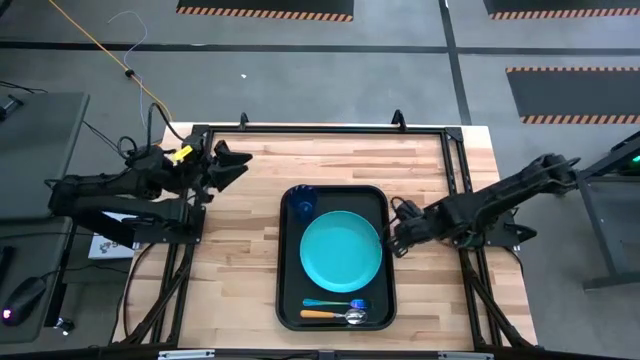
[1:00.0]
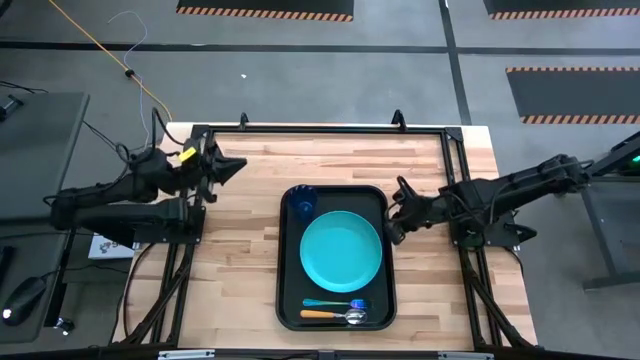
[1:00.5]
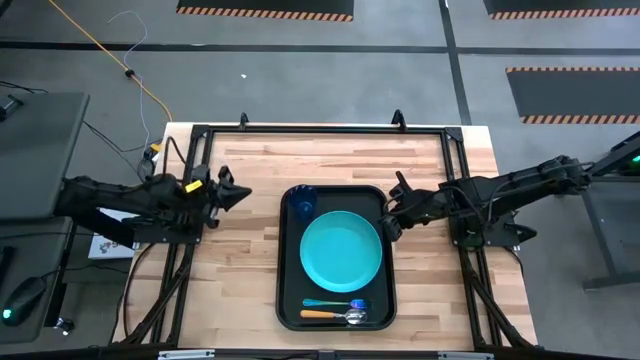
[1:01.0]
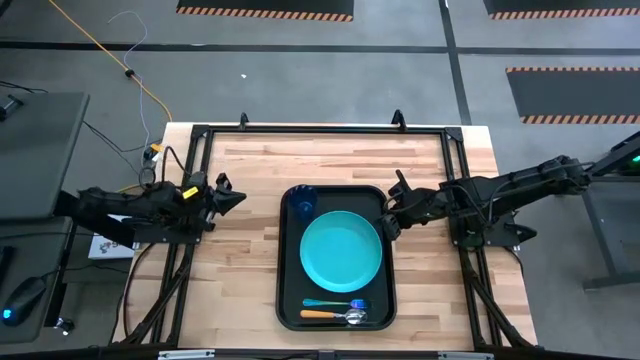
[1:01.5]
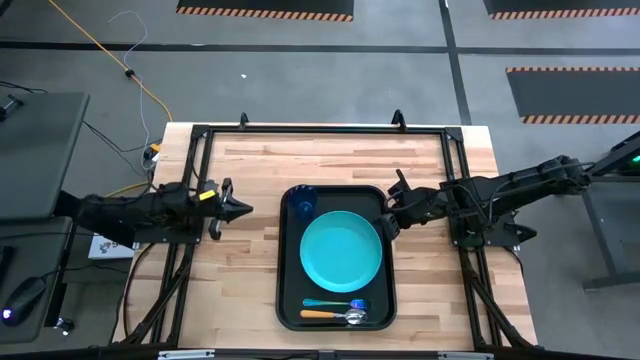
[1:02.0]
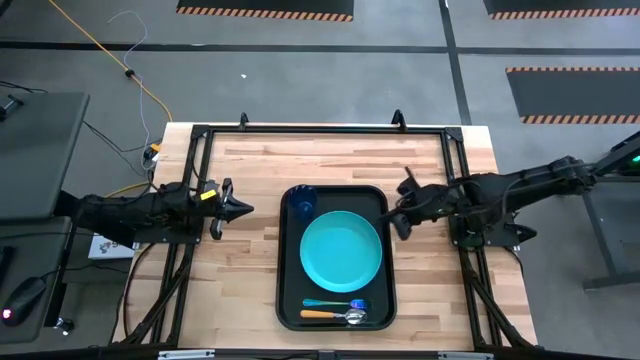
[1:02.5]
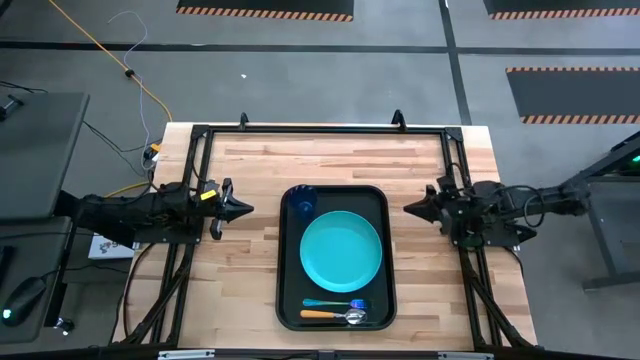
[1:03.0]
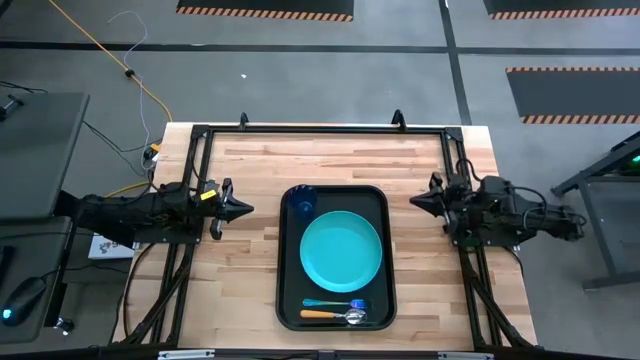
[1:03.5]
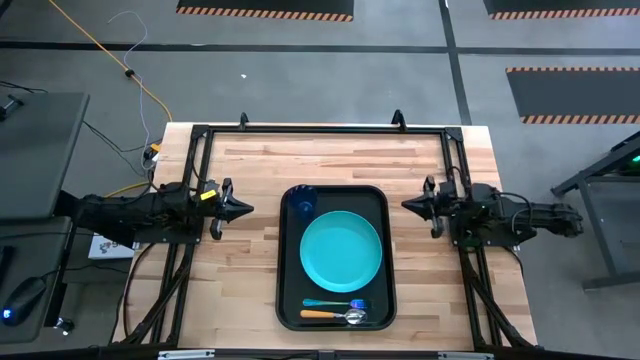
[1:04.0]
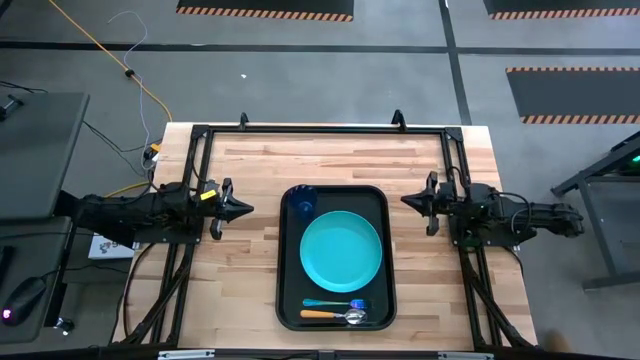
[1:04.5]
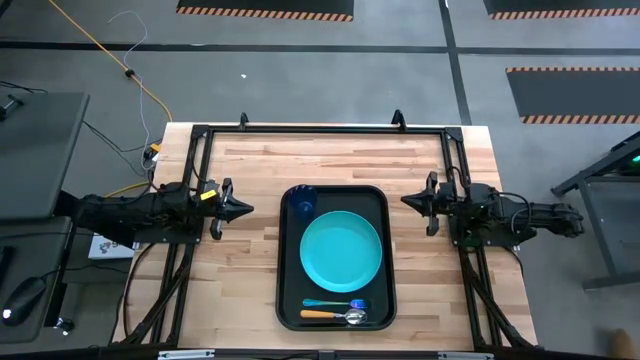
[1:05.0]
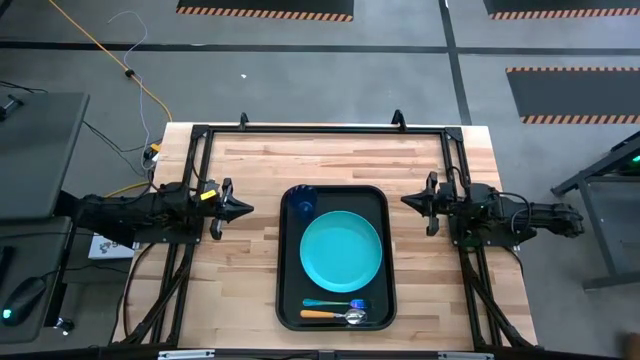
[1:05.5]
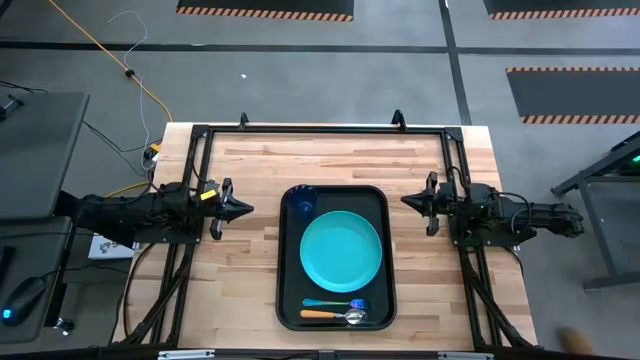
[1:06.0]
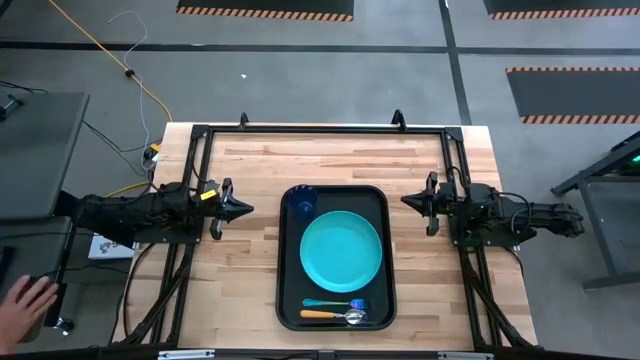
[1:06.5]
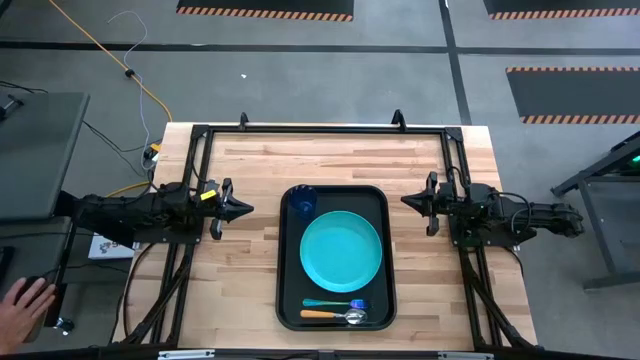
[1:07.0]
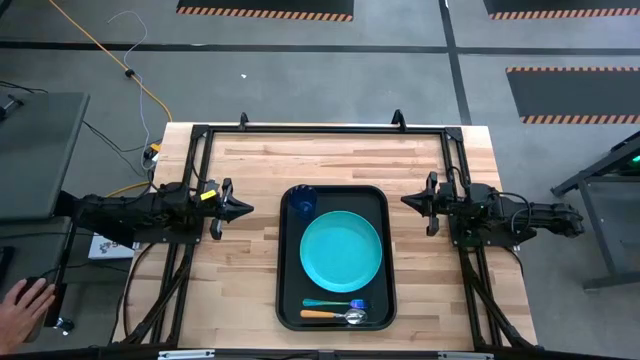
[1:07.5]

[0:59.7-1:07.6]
Task: Pick and place plate/cup/fork/spoon on tray
Return to Home Position

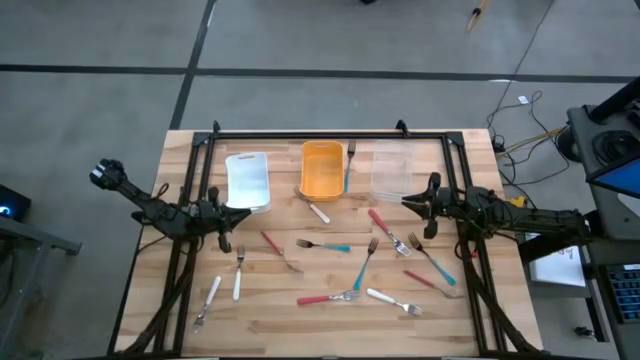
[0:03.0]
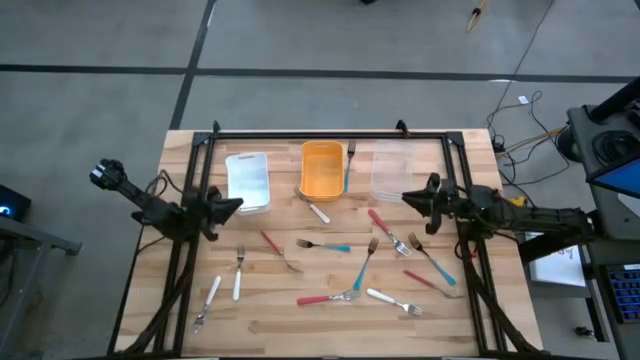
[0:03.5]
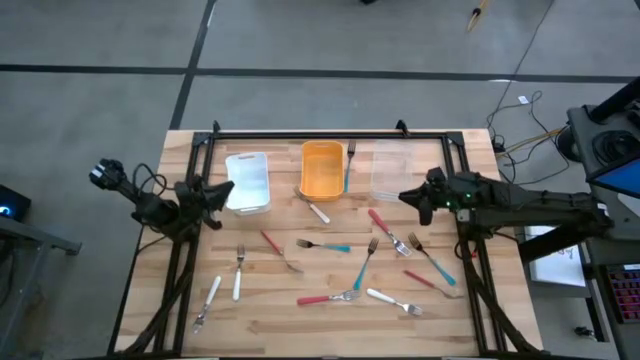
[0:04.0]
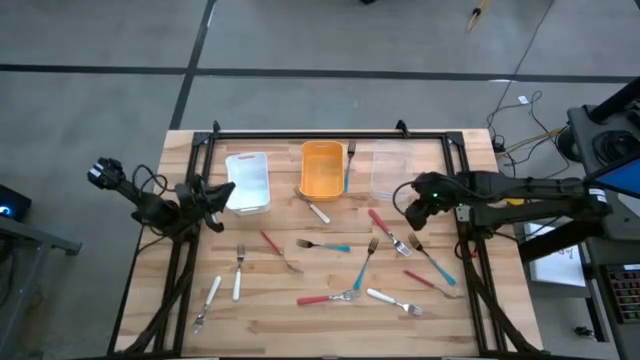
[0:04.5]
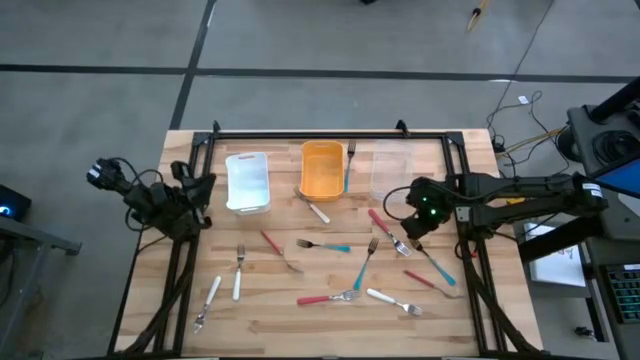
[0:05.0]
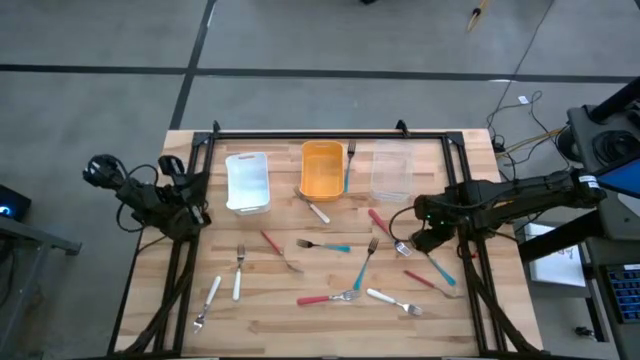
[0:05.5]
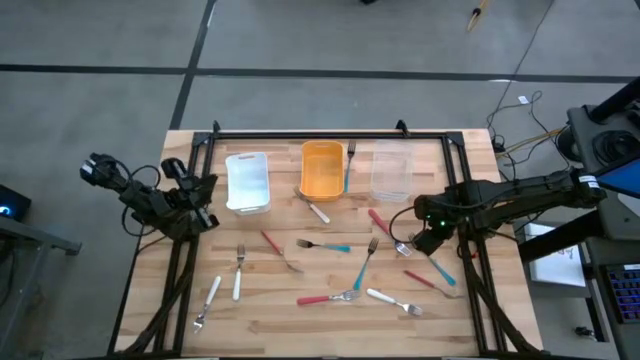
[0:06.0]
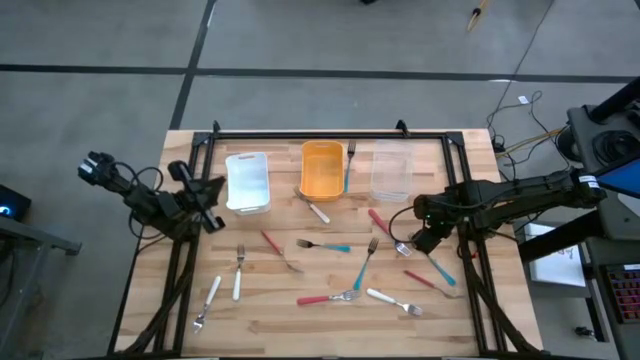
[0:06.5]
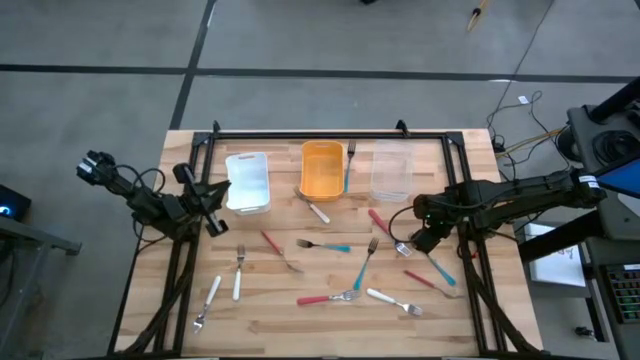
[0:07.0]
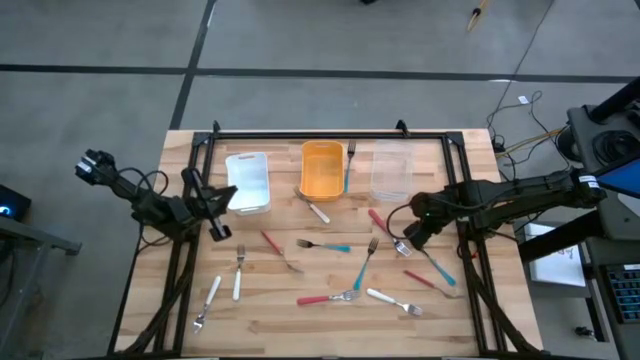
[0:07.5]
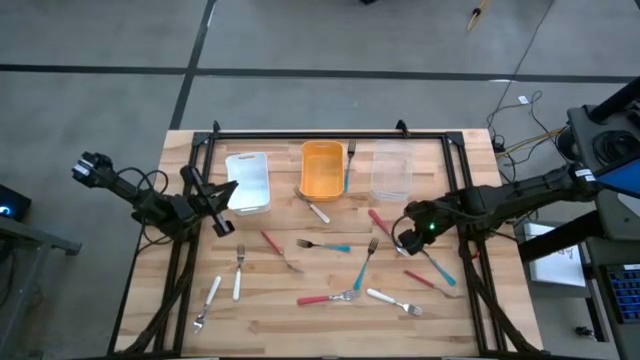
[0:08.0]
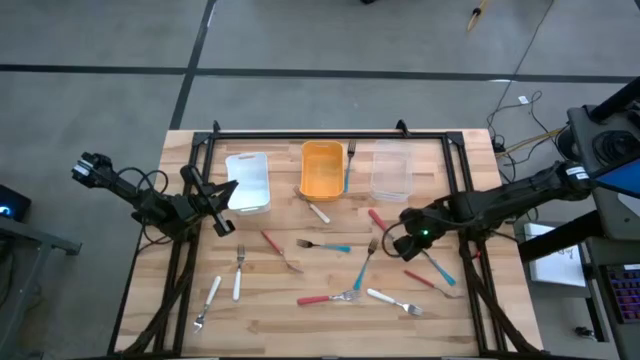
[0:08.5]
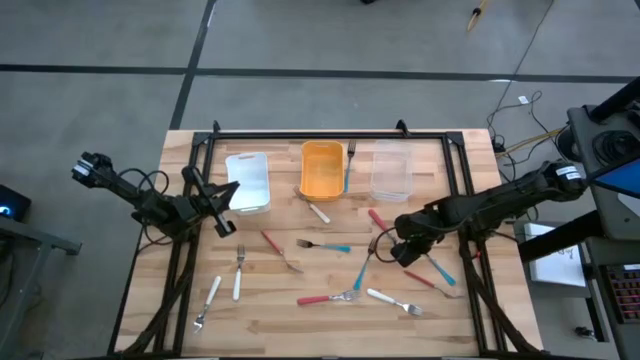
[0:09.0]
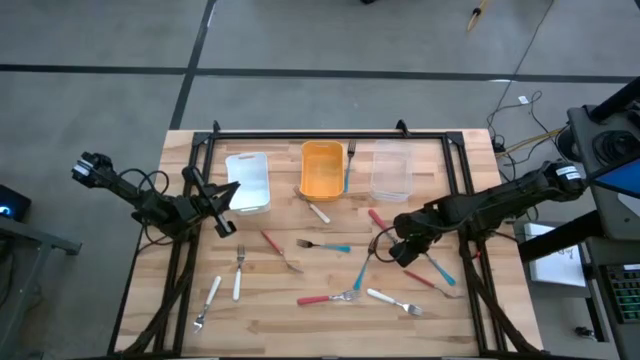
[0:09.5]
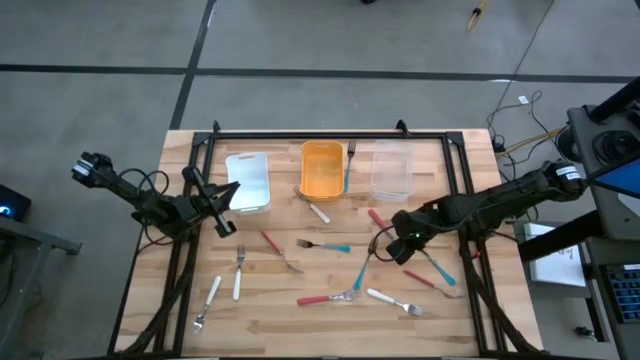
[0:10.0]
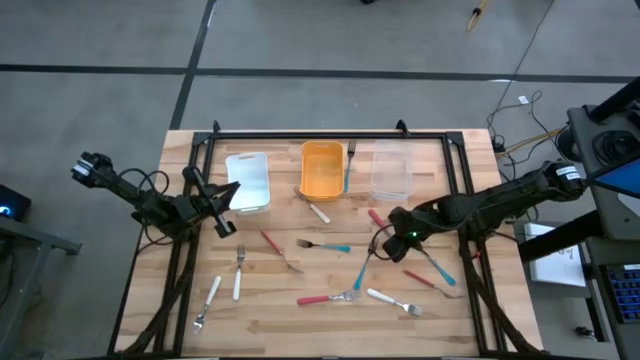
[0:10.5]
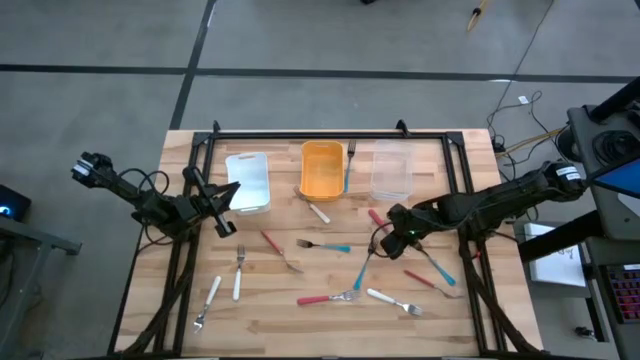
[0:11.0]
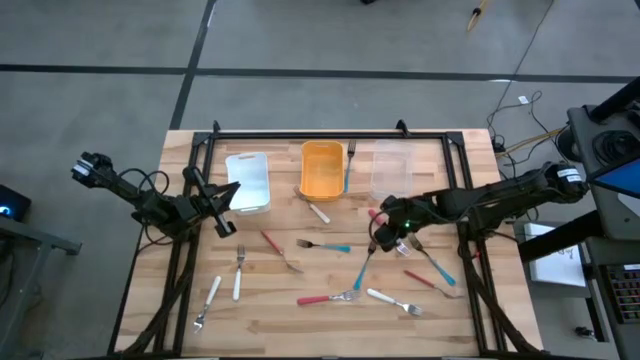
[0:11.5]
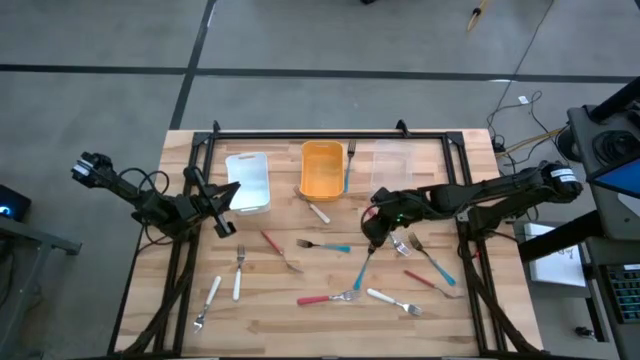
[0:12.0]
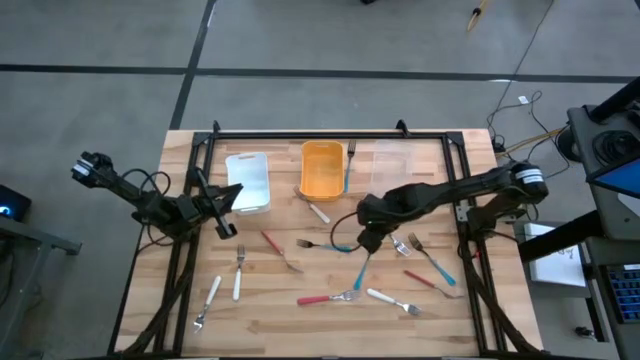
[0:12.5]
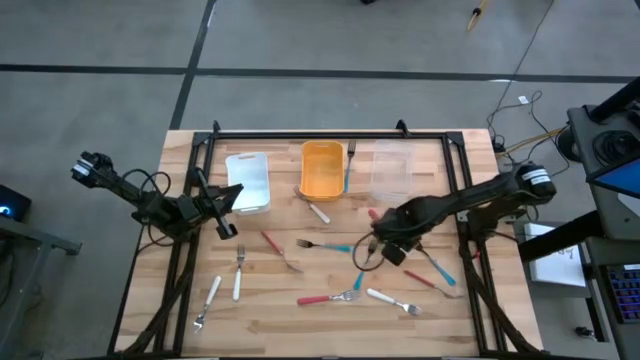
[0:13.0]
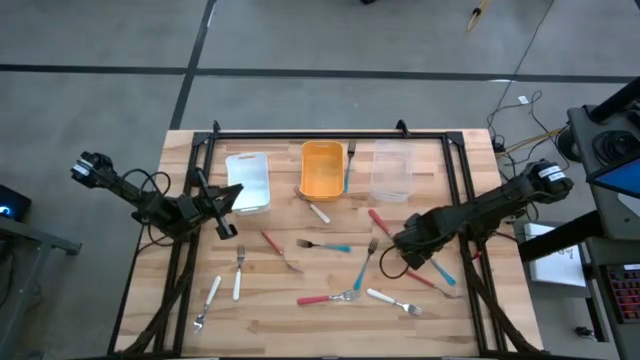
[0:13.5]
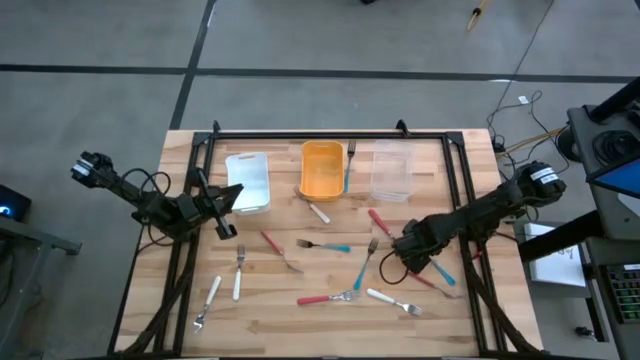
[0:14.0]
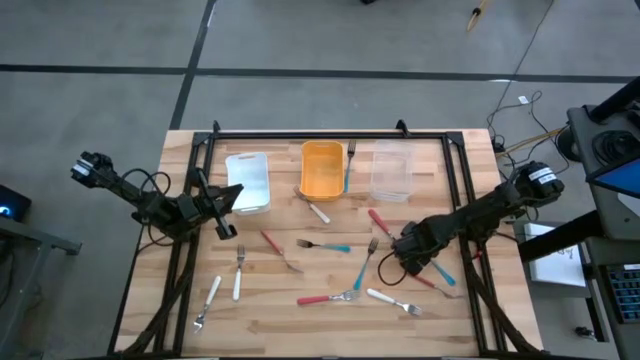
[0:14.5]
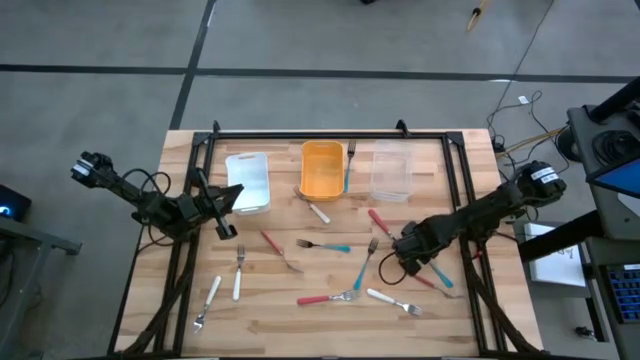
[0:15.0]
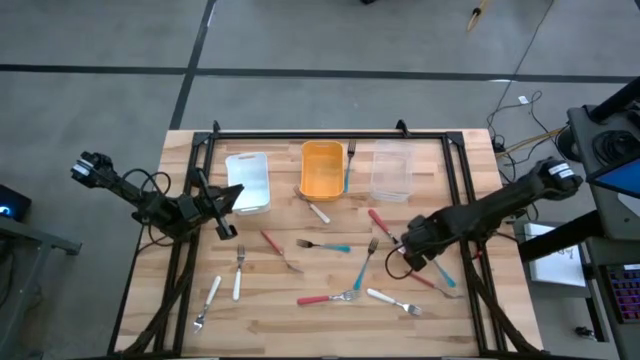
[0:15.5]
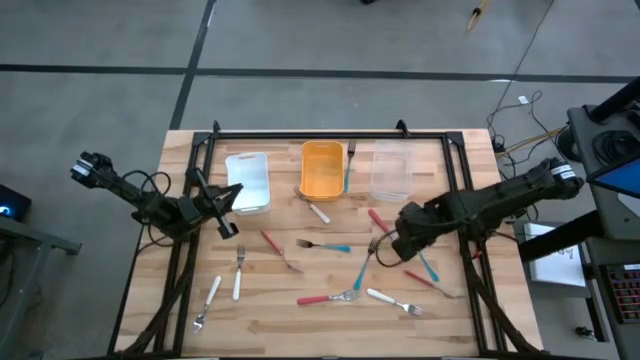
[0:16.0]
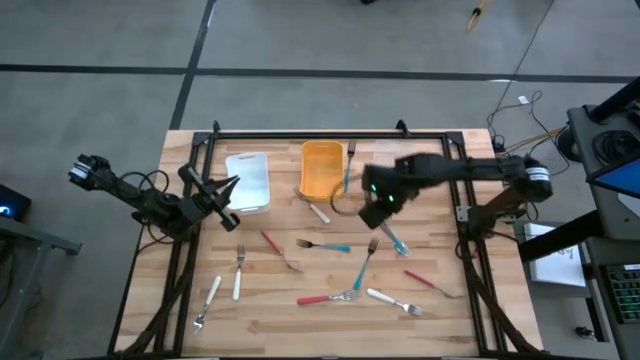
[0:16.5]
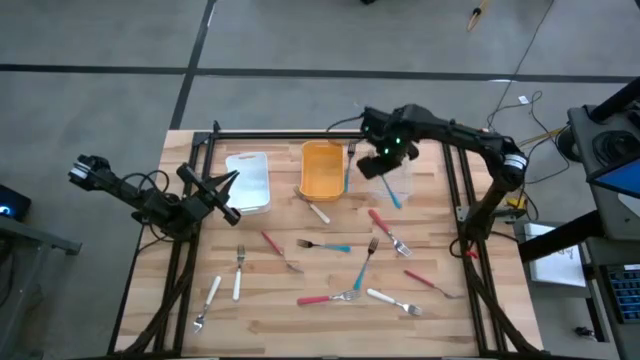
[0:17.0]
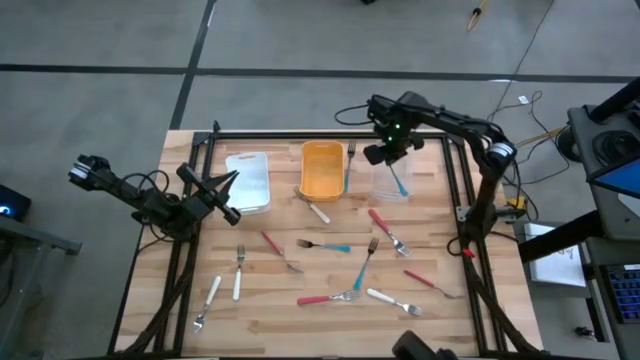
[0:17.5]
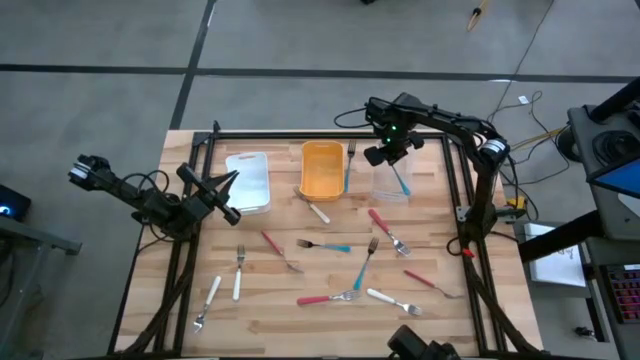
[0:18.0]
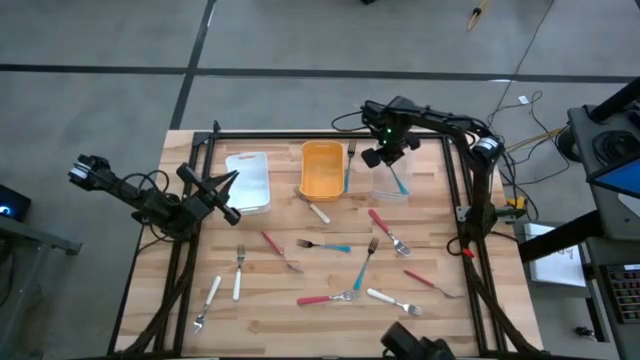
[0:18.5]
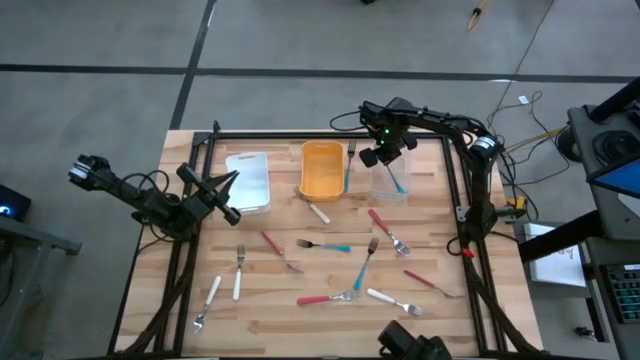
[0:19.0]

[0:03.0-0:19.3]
Task: Sort silverware by color (type)
Put the blue fork into the transparent bin
